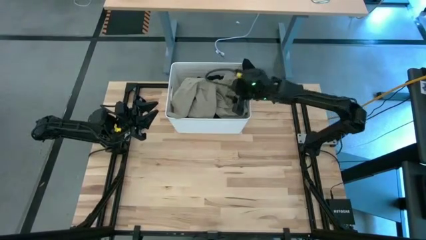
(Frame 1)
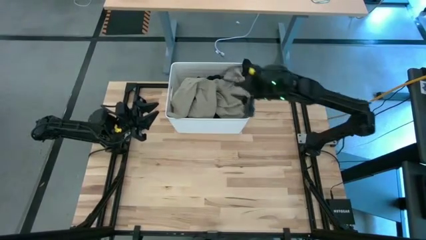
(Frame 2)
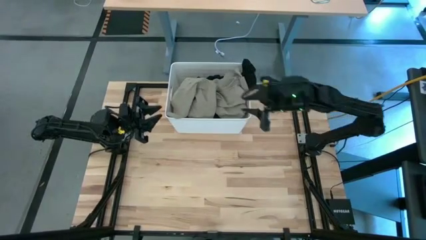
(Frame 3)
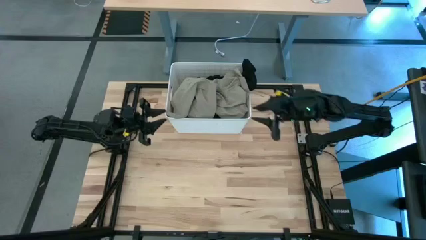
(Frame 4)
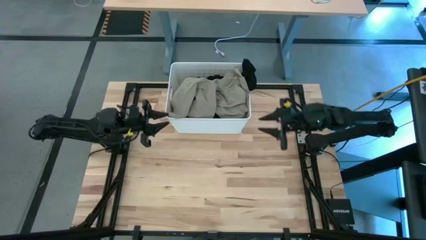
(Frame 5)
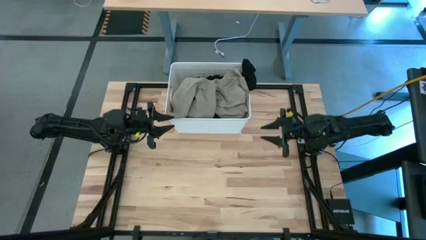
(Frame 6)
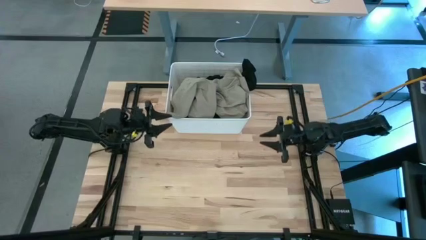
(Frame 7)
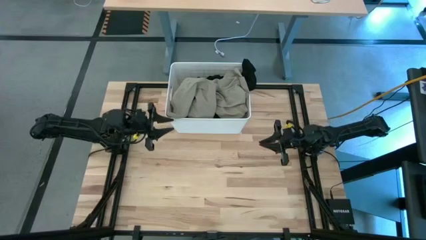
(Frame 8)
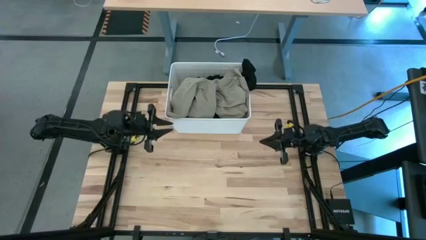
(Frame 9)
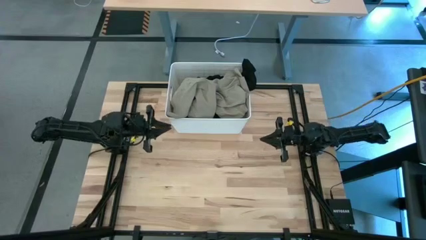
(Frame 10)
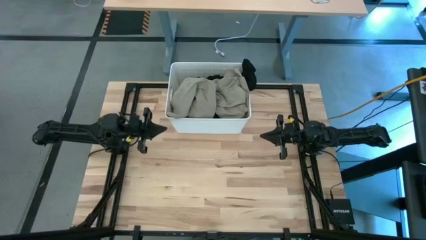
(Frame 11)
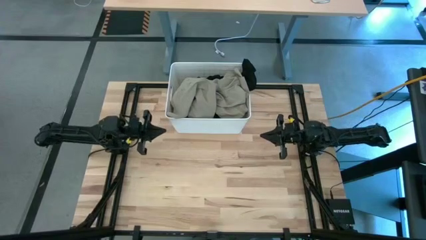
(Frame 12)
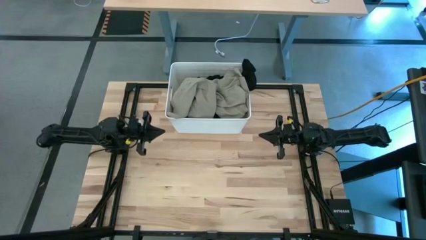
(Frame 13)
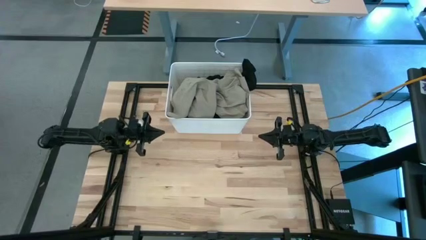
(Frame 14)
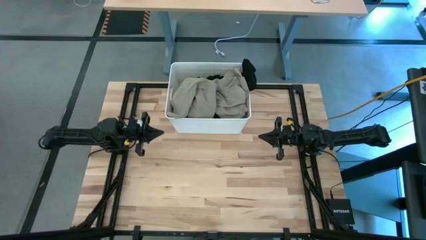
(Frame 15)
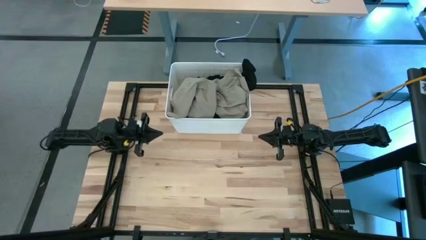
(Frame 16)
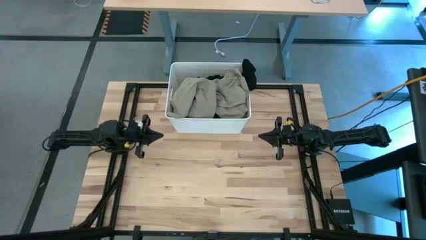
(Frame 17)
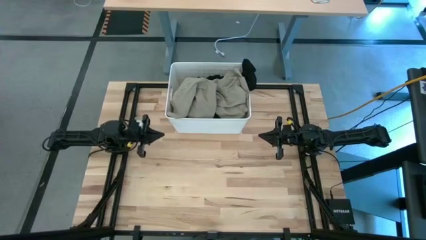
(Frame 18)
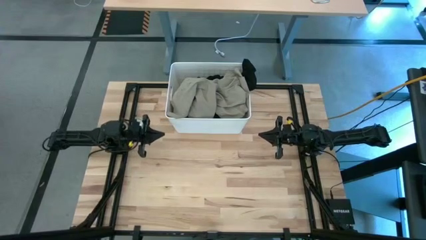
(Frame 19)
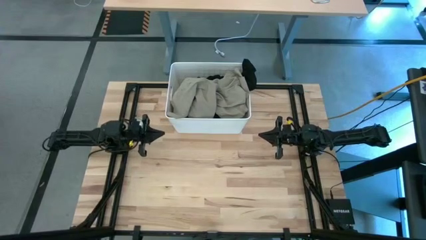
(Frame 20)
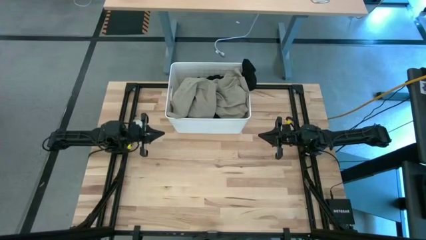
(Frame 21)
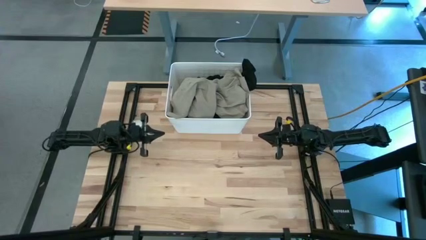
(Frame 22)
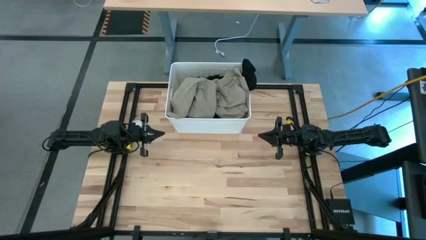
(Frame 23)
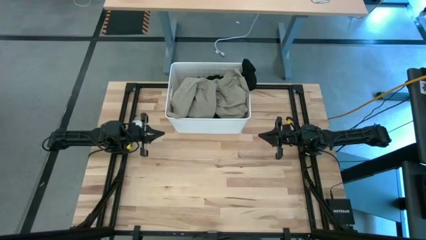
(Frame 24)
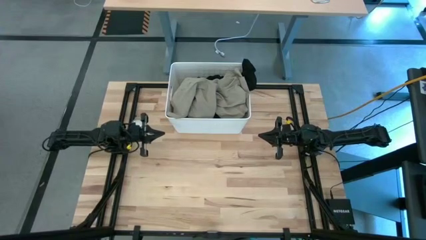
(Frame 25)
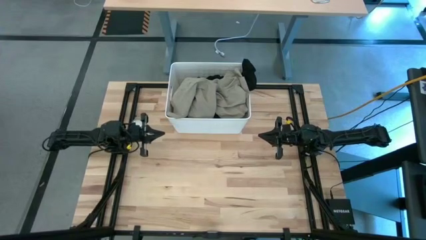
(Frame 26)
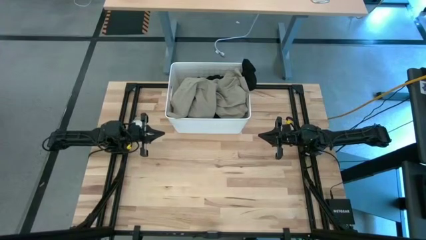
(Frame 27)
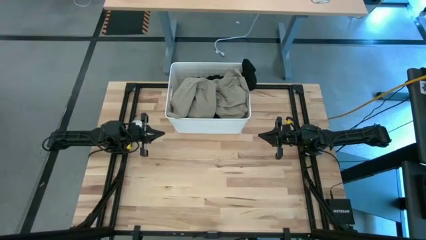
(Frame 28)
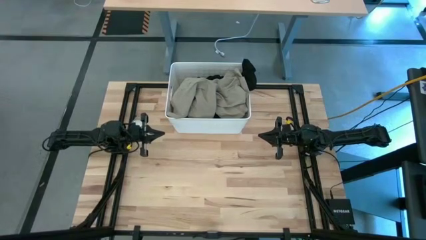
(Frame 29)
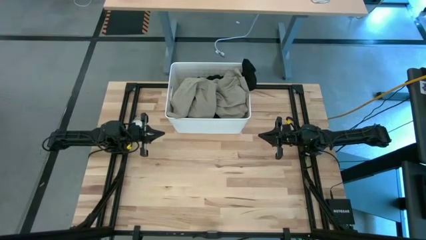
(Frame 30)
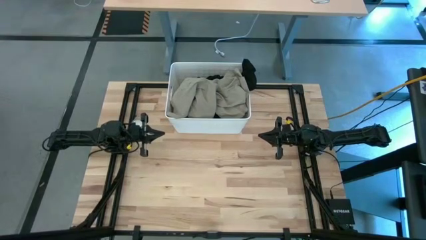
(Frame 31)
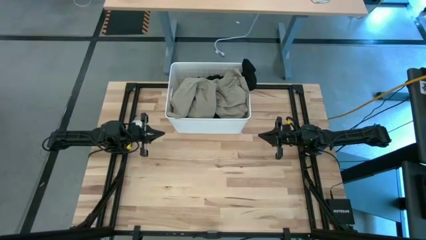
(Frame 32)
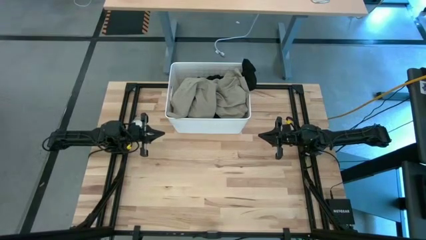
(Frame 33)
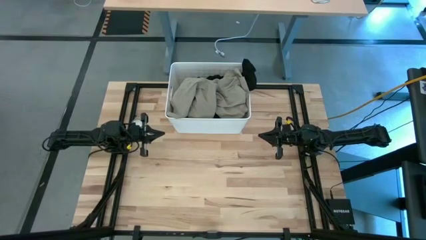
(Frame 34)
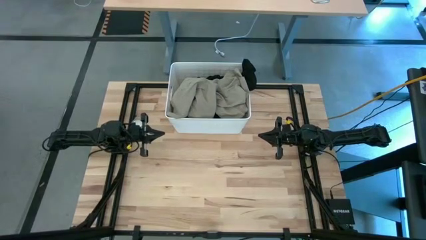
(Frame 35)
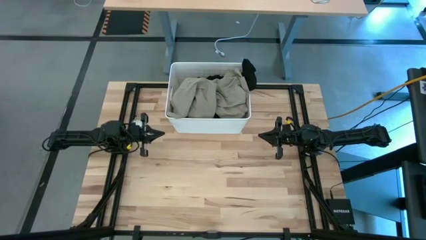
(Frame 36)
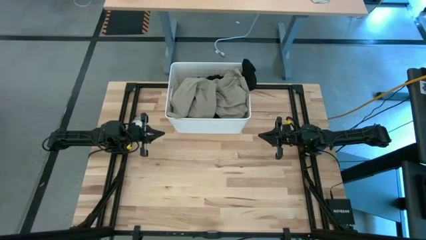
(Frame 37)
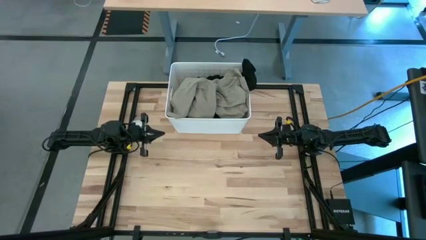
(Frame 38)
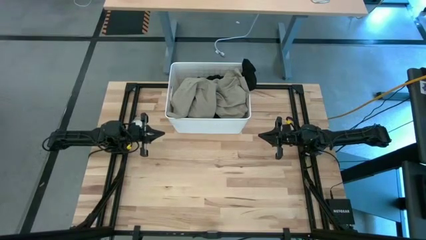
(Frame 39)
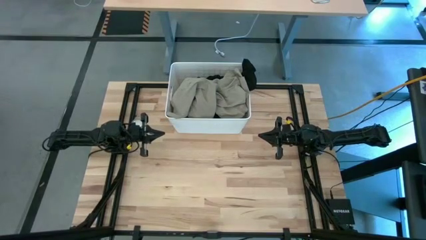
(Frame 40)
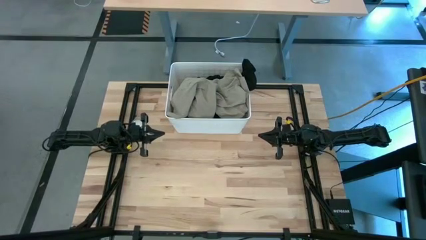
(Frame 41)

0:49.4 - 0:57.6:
Task: Sort clothes
Return to Home Position

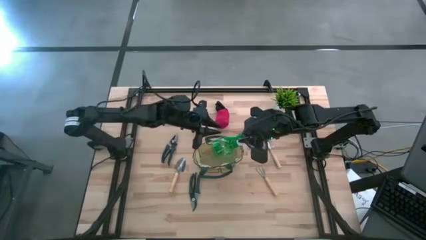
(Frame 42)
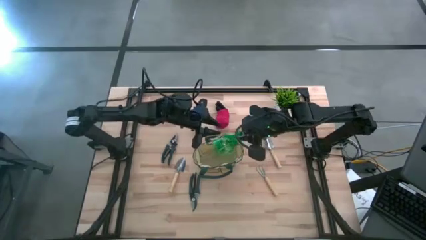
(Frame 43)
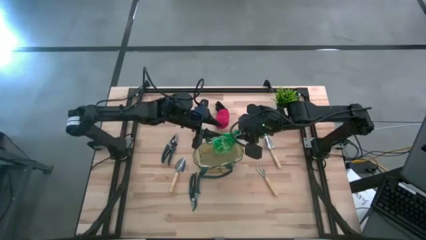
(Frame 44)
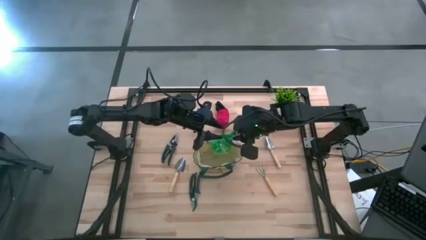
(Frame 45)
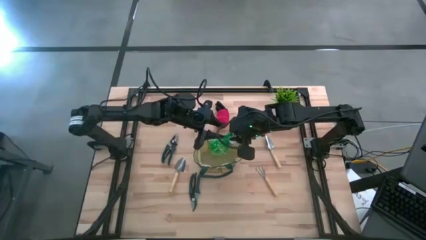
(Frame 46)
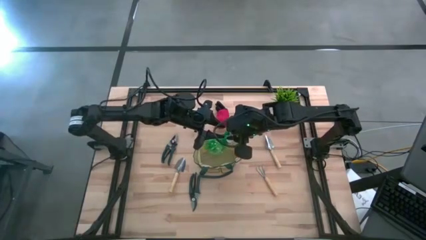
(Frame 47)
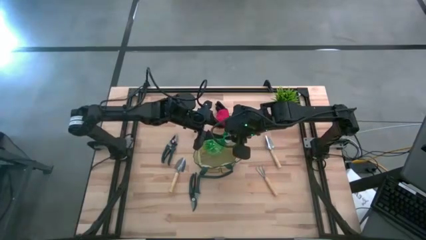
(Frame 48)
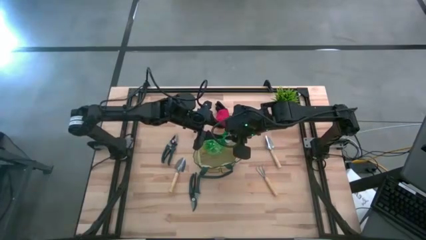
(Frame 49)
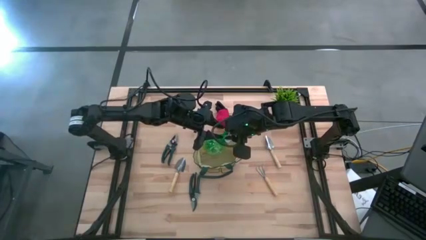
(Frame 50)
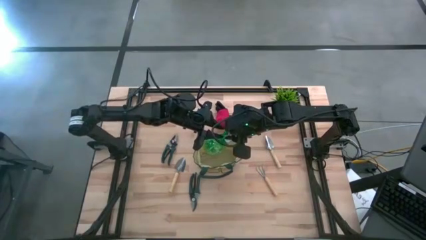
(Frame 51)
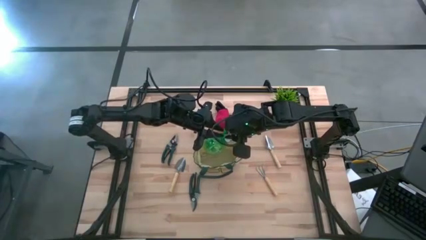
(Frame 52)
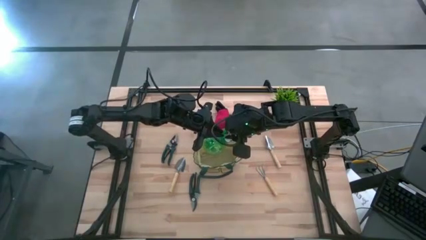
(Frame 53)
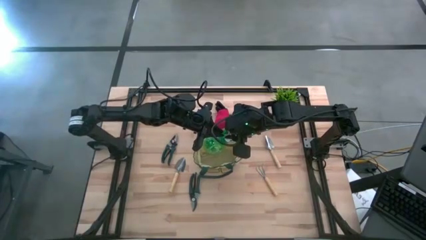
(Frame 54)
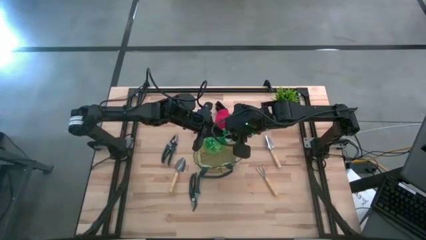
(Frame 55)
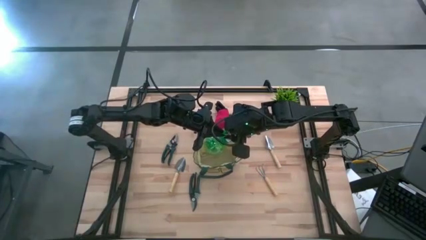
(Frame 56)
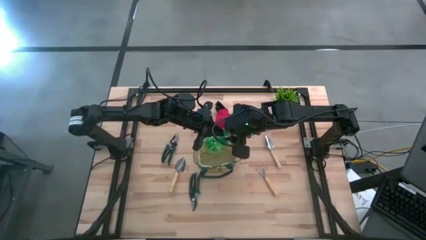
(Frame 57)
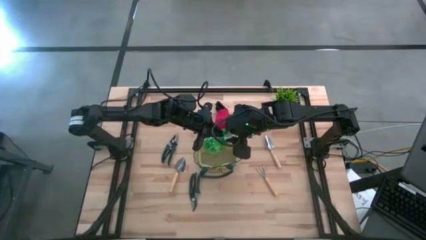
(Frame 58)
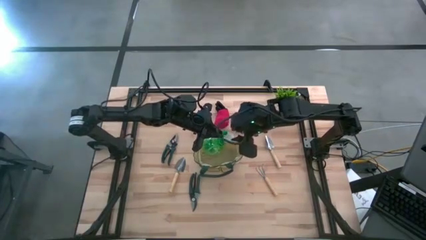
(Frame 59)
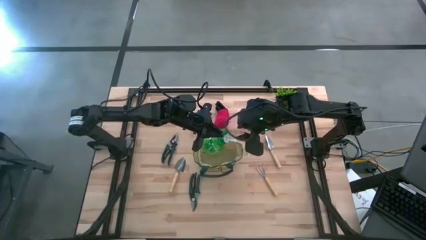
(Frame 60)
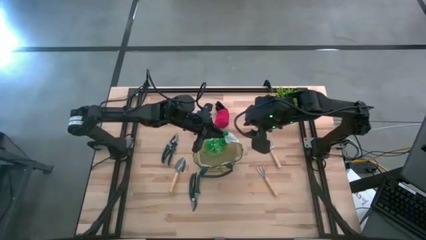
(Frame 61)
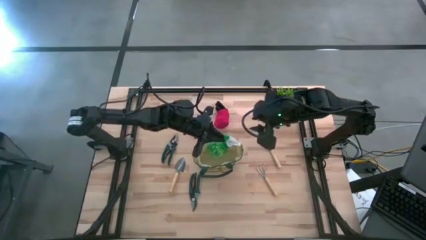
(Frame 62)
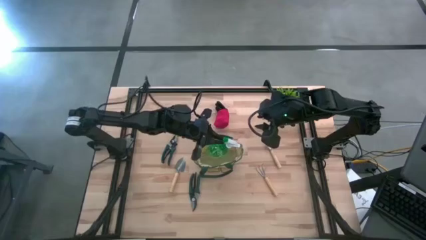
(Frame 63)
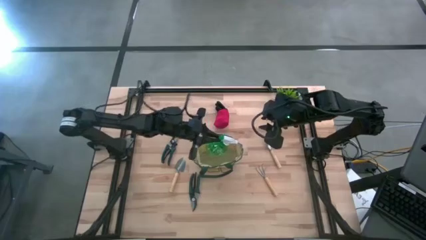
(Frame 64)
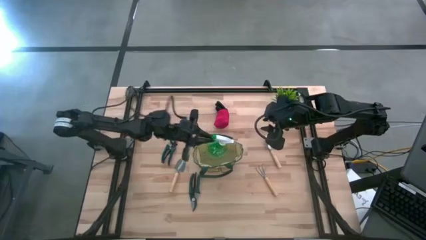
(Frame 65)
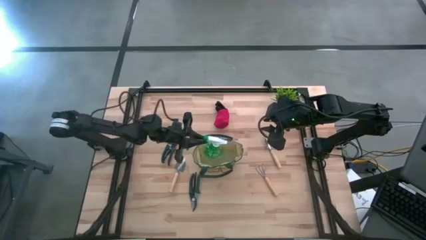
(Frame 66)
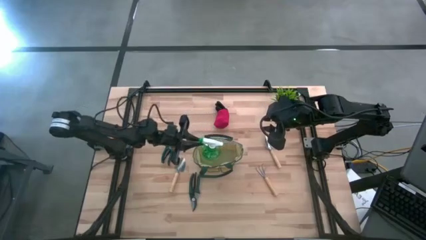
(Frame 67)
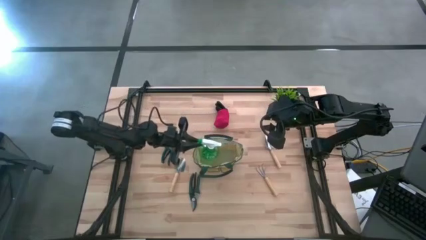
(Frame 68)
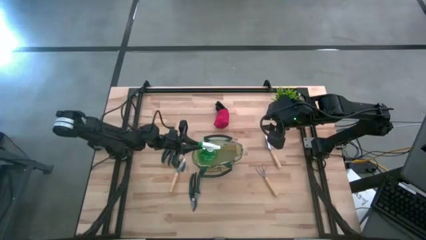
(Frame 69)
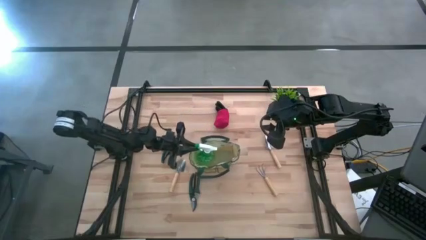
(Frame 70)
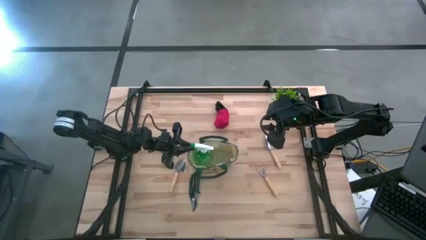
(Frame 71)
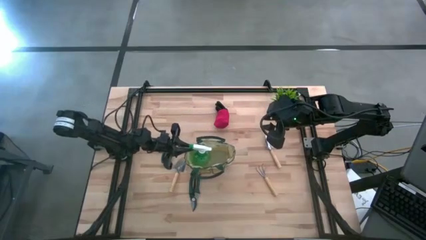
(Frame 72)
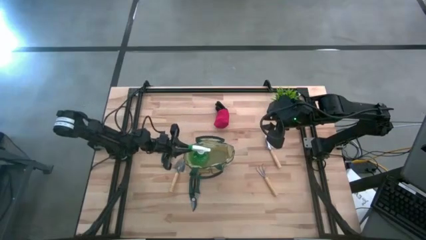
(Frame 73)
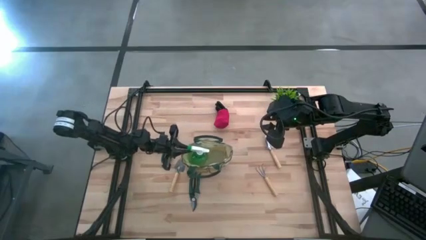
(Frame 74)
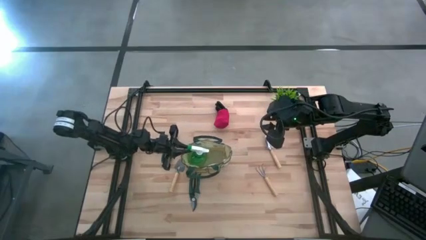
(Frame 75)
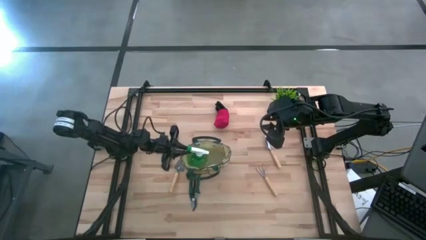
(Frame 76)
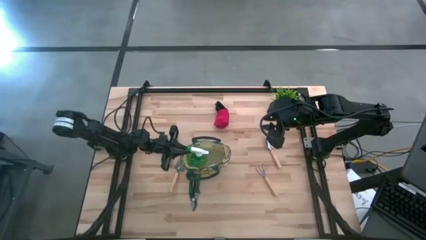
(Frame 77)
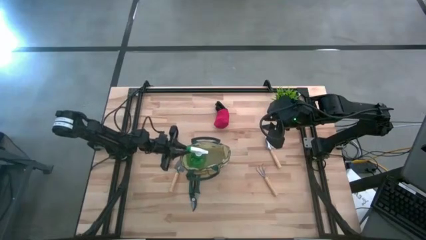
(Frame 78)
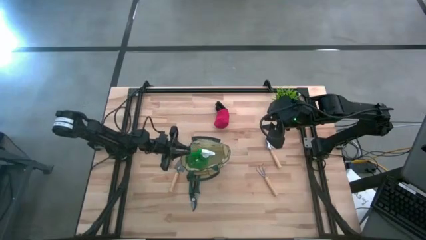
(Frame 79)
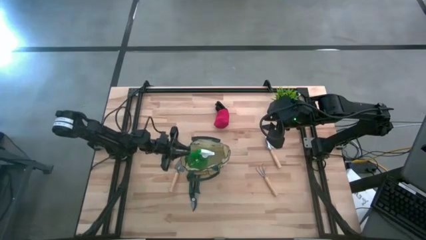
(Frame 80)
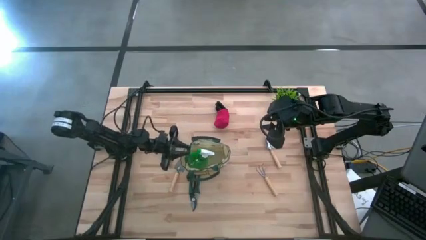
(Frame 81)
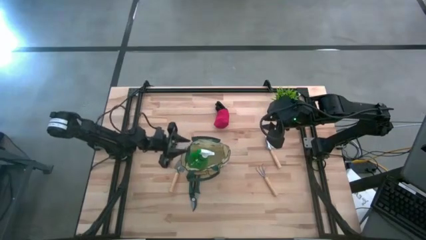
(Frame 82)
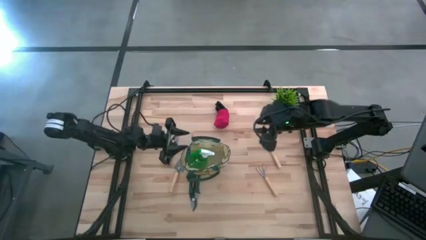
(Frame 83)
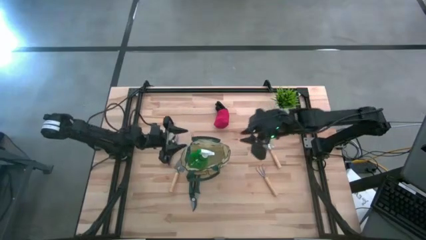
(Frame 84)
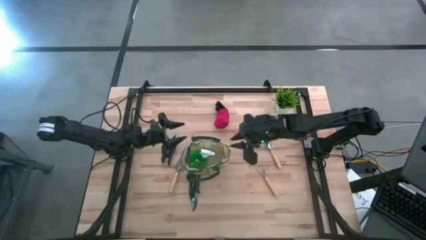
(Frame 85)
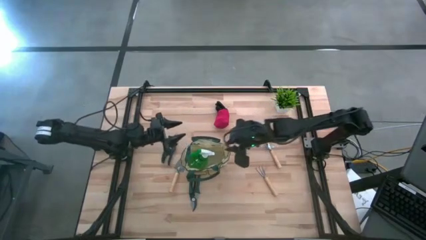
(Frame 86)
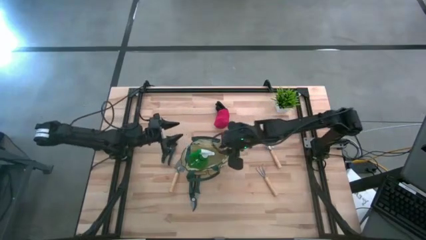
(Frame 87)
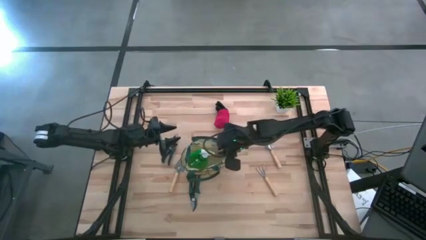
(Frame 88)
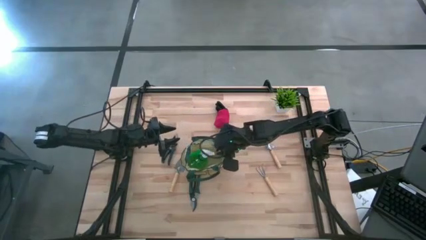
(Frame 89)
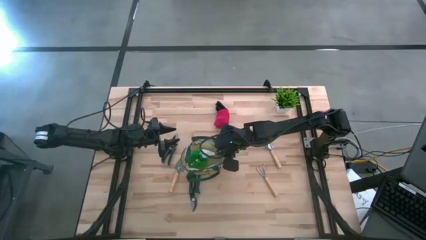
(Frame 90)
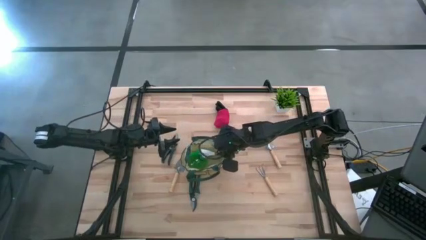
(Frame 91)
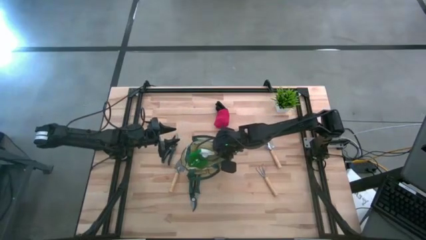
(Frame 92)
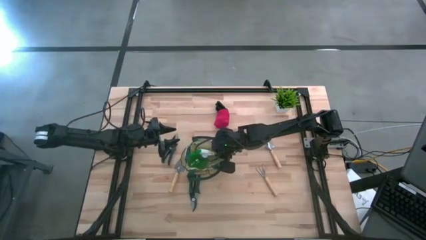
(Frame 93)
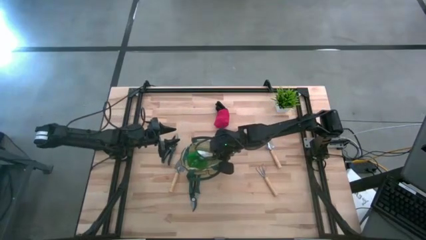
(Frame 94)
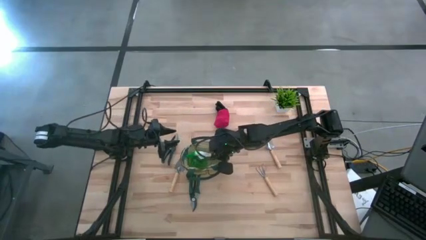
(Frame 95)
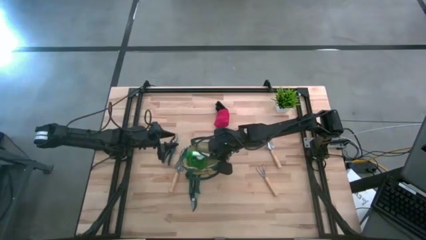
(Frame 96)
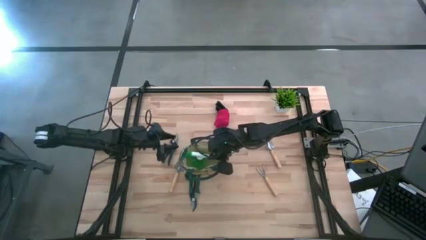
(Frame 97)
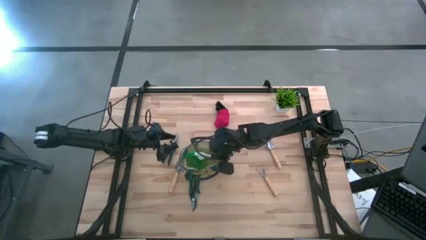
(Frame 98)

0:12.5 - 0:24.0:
Task: Pick & Place Garden tools in Gardening bag
Put the green spray bottle into the white gardening bag
